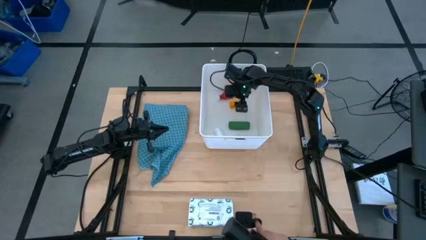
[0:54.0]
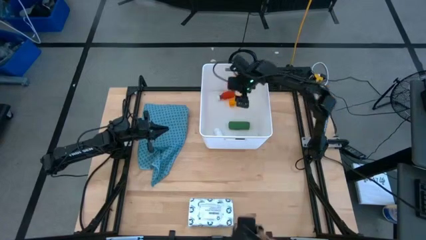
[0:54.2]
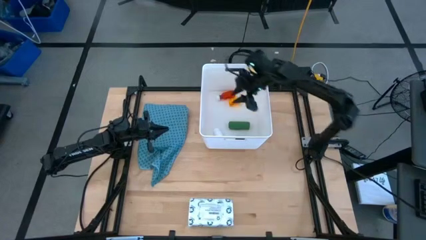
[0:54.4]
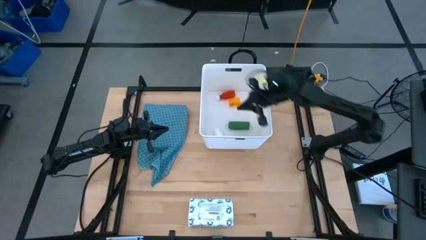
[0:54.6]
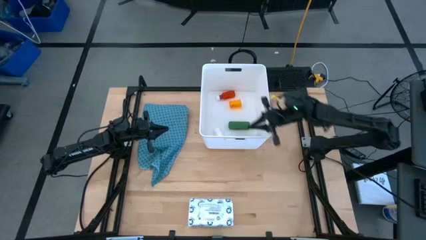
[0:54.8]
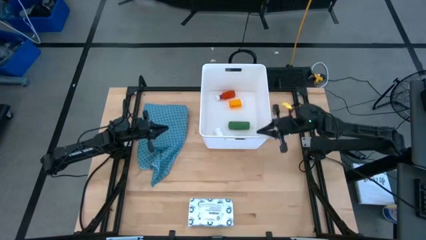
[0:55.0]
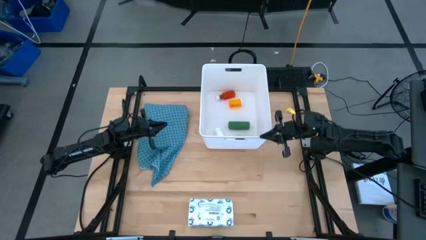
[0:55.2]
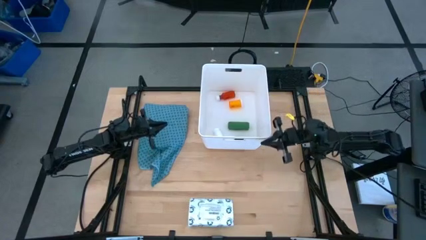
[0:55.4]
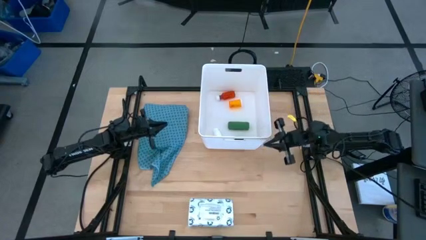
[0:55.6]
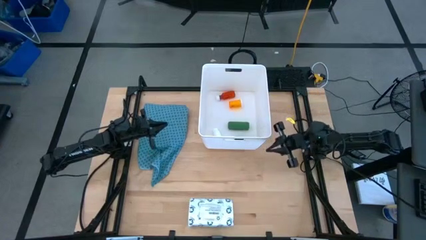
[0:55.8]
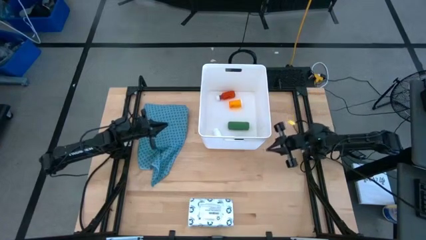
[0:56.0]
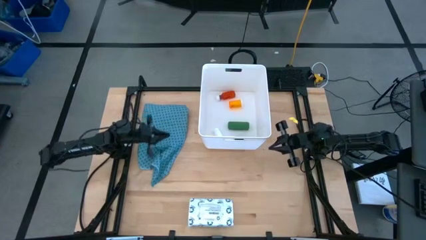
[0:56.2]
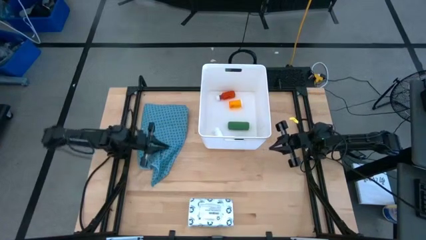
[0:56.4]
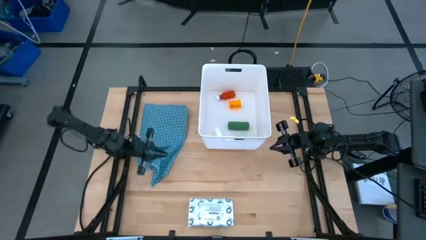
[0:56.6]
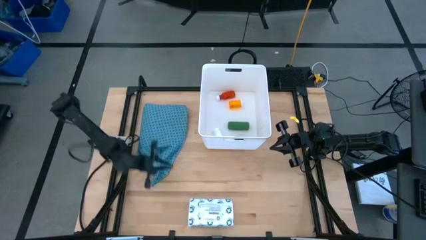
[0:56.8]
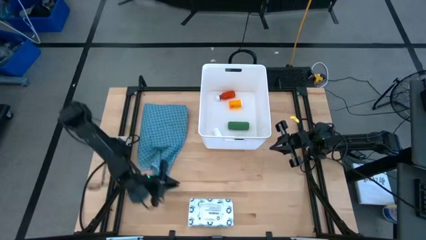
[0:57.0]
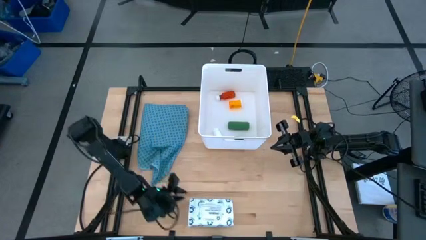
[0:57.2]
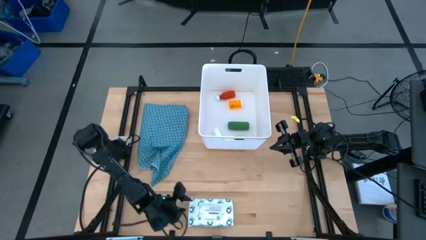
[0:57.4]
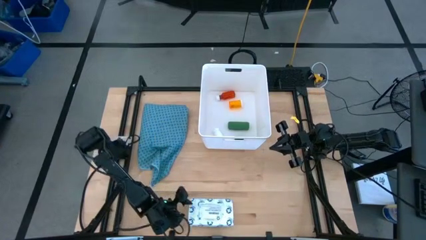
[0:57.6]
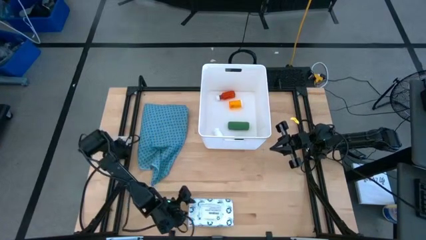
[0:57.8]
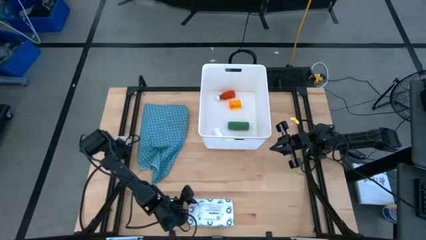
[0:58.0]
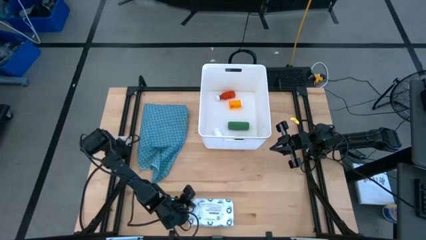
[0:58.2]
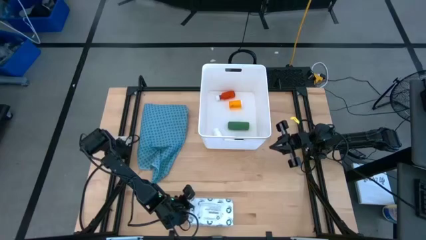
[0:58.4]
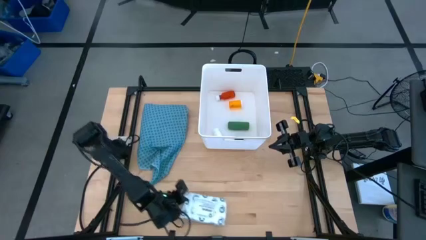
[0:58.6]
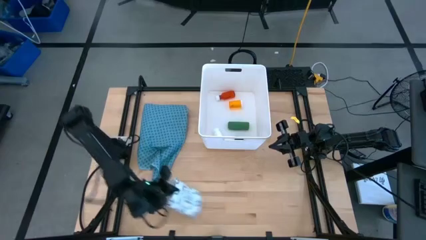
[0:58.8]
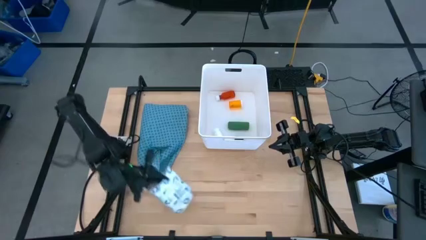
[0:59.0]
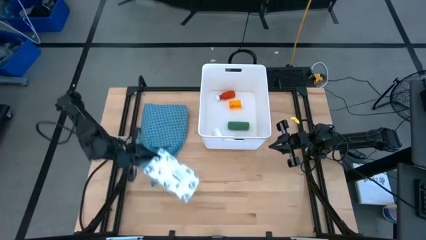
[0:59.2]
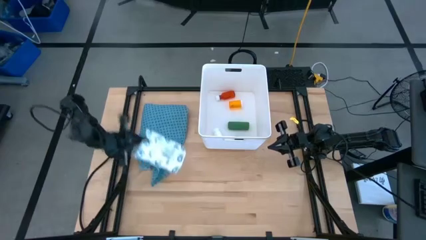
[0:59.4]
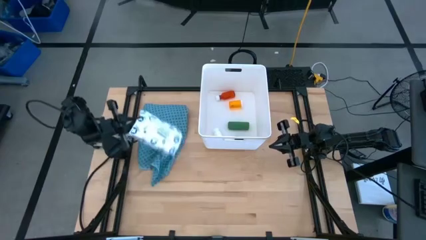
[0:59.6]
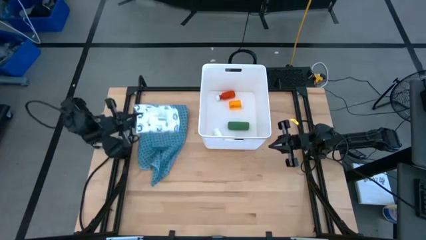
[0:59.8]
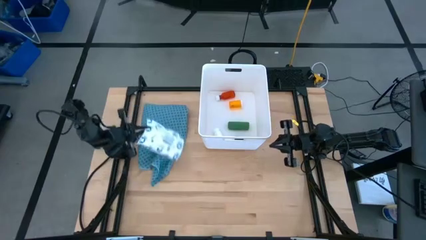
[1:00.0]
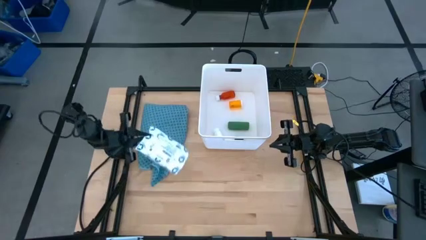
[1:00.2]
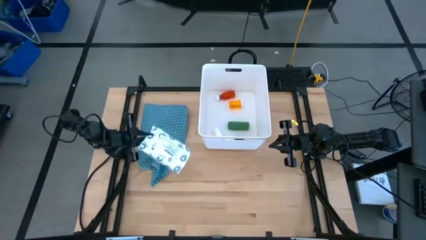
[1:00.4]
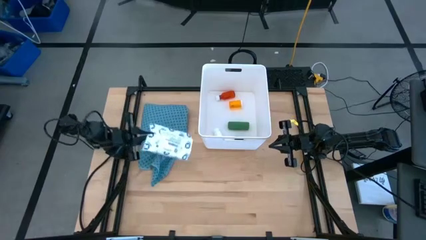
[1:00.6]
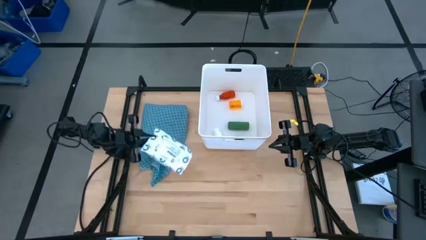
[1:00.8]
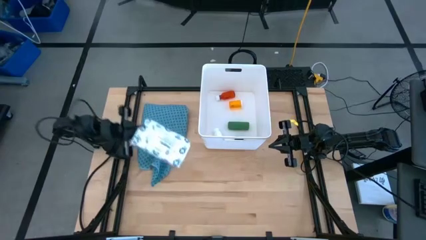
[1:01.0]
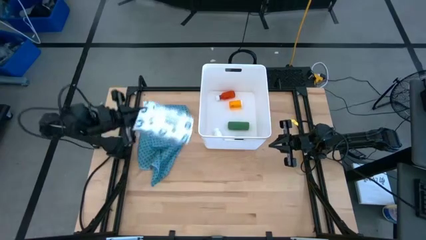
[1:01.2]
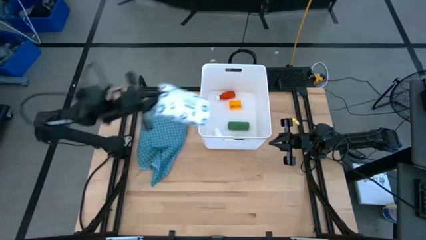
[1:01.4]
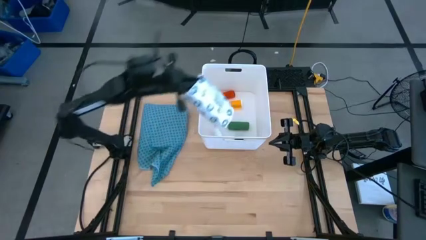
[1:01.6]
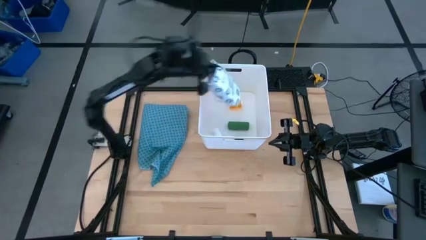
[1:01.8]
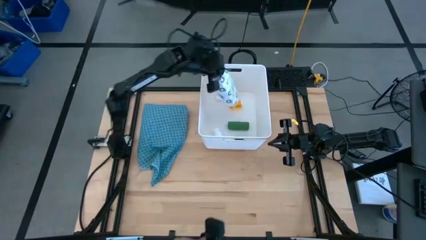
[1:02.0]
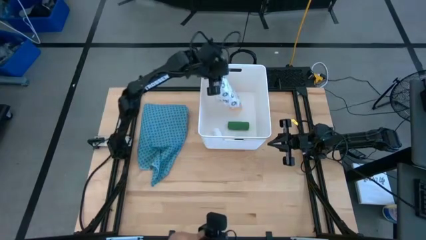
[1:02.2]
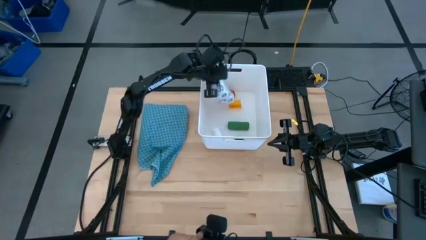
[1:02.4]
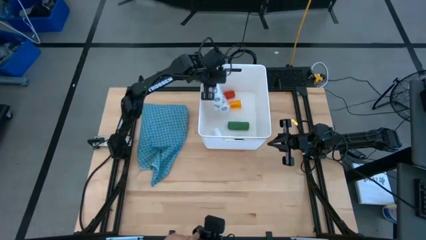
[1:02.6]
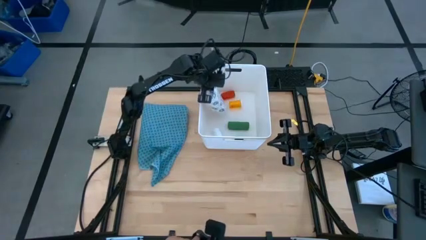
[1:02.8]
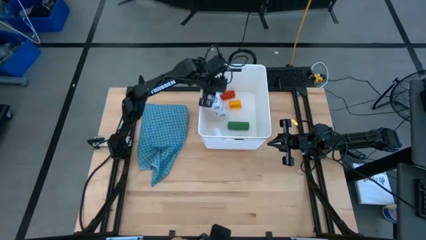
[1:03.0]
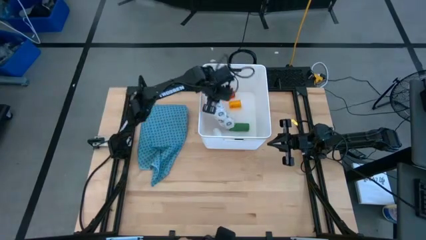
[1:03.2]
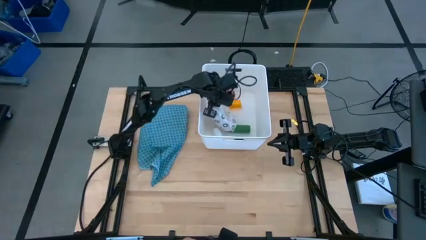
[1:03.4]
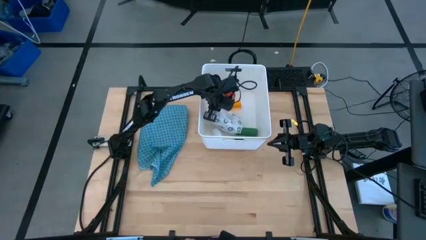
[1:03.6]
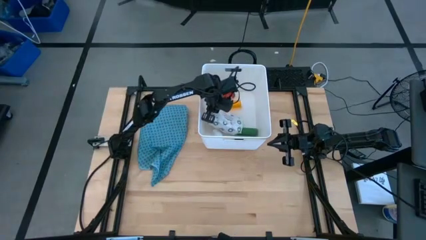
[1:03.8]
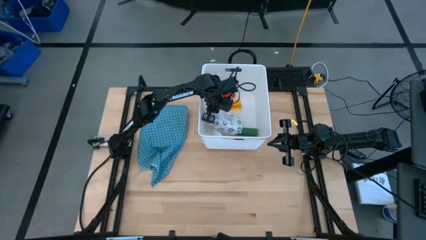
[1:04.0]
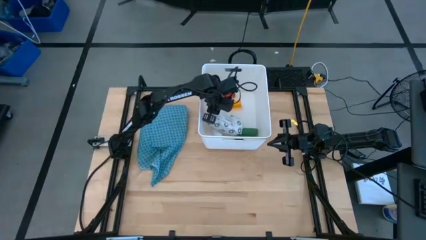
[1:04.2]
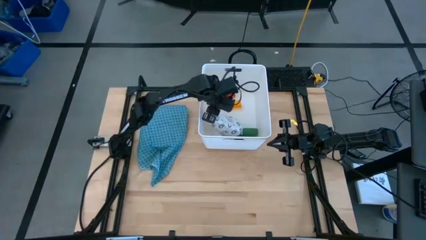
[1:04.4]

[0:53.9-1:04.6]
Task: Pick & place medical supplies in basket/bin
Put the white mailer bag into the white bin

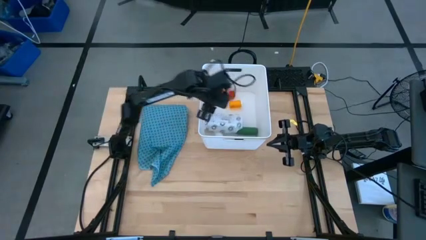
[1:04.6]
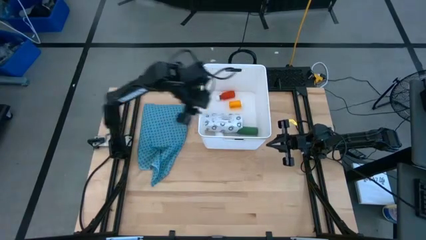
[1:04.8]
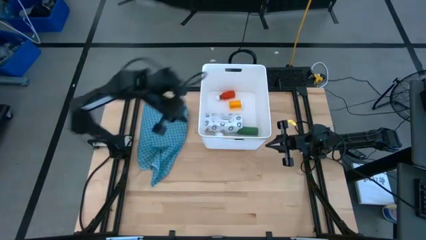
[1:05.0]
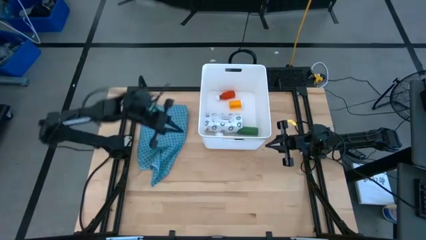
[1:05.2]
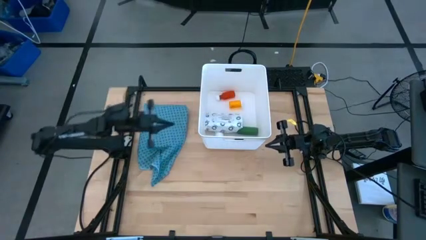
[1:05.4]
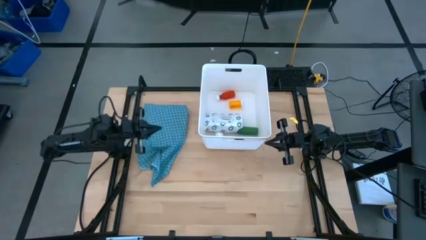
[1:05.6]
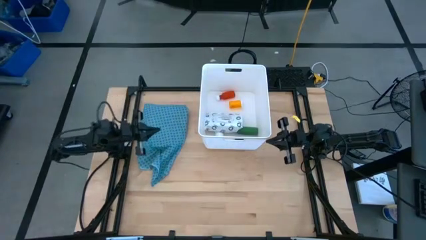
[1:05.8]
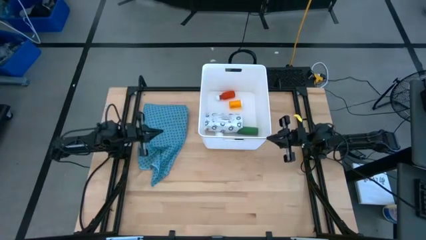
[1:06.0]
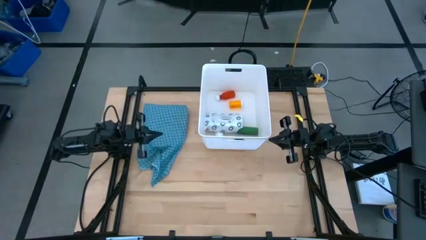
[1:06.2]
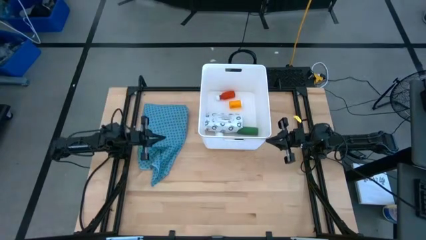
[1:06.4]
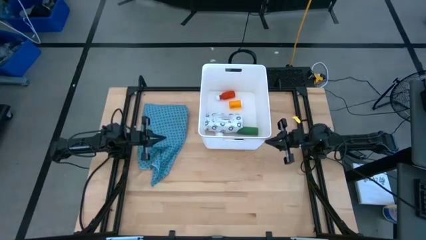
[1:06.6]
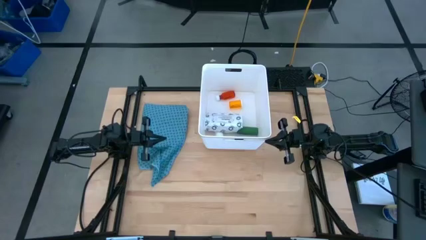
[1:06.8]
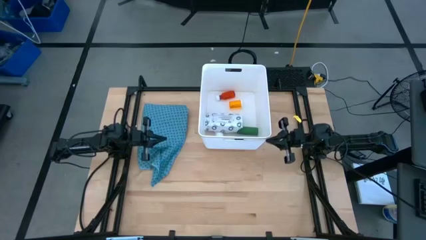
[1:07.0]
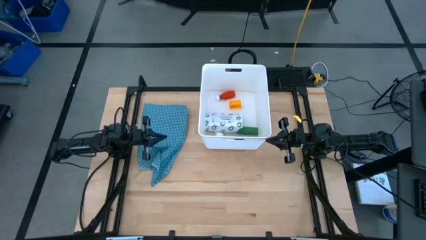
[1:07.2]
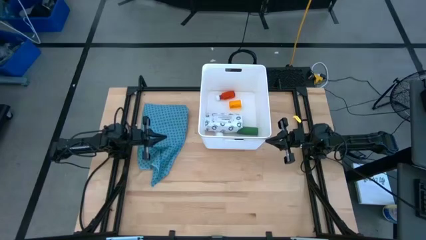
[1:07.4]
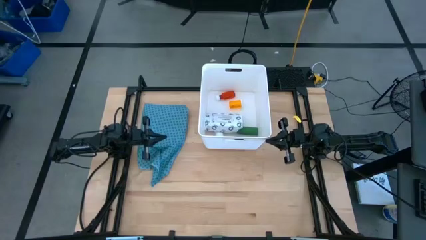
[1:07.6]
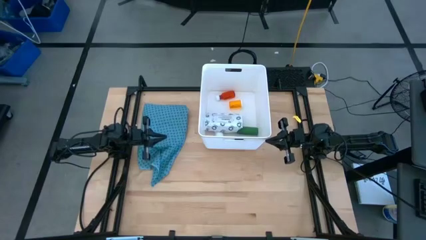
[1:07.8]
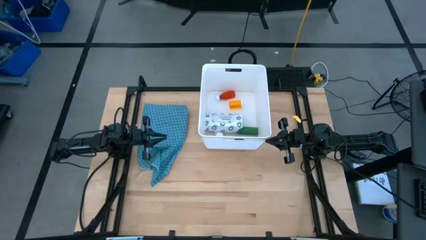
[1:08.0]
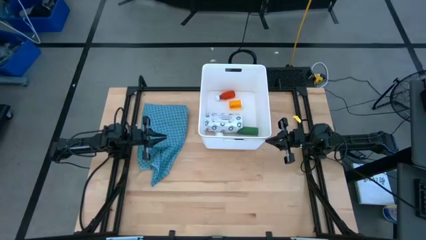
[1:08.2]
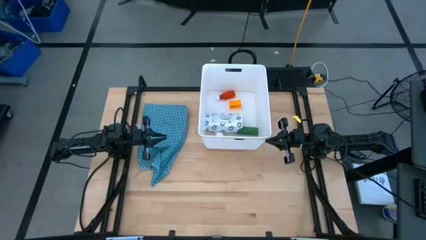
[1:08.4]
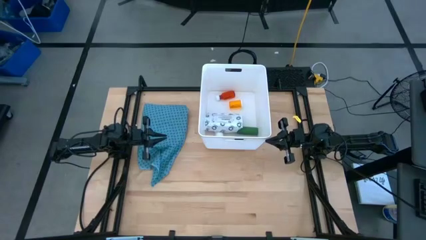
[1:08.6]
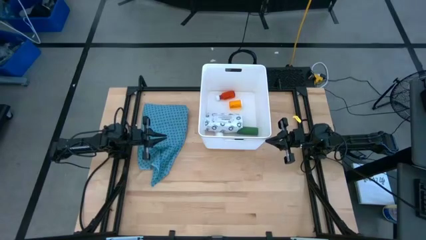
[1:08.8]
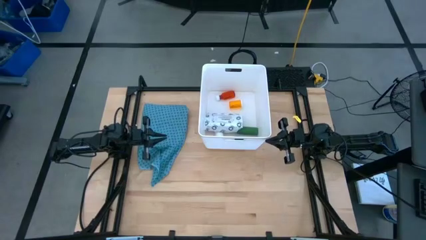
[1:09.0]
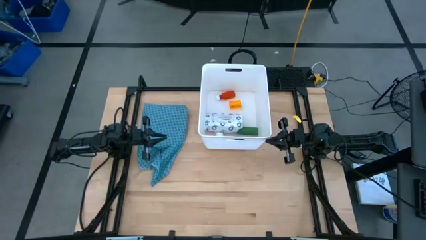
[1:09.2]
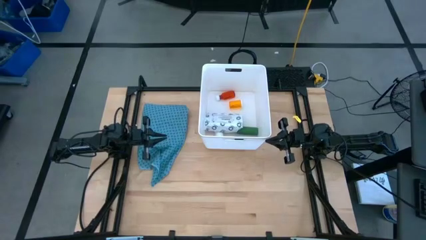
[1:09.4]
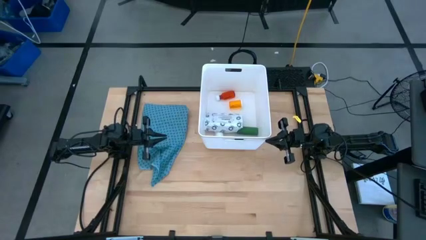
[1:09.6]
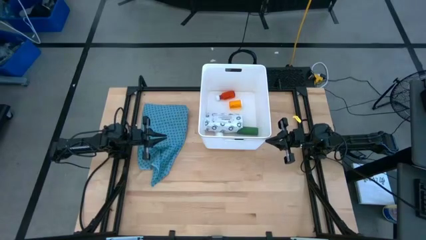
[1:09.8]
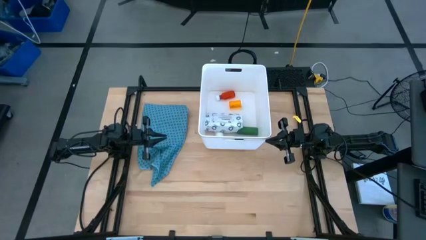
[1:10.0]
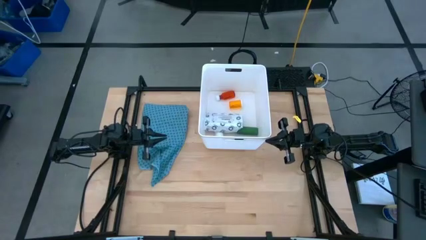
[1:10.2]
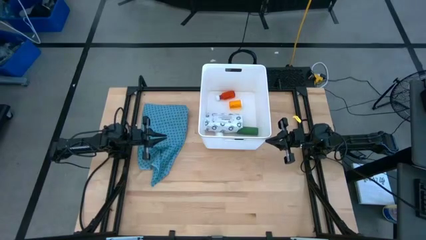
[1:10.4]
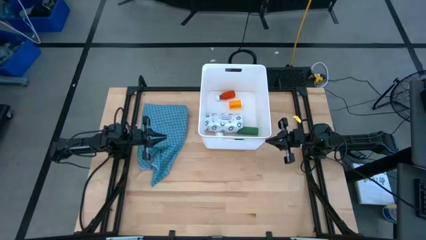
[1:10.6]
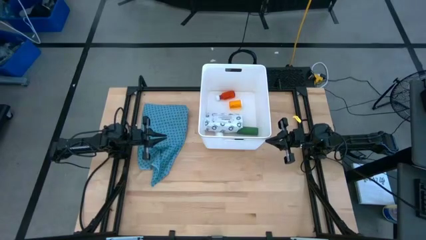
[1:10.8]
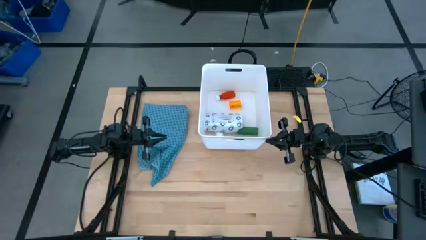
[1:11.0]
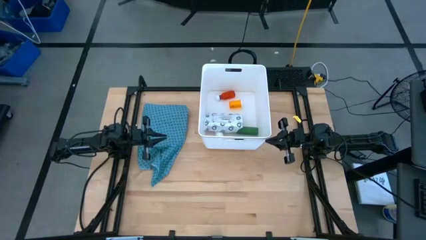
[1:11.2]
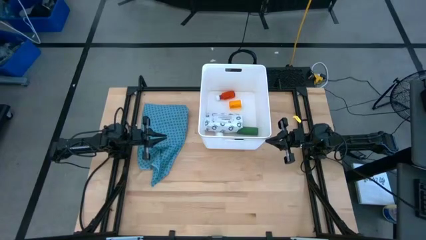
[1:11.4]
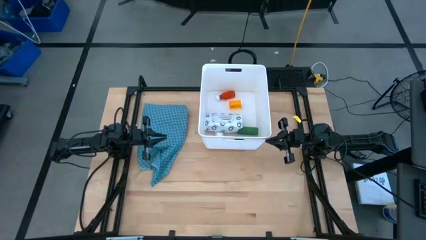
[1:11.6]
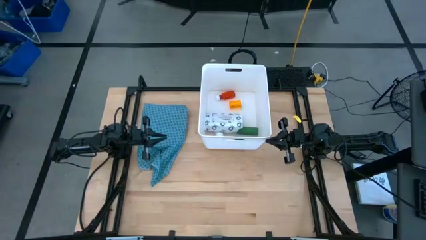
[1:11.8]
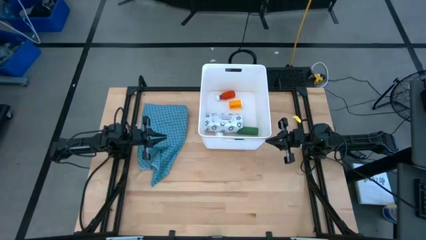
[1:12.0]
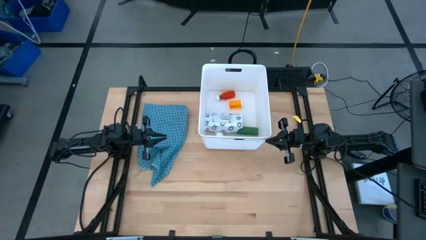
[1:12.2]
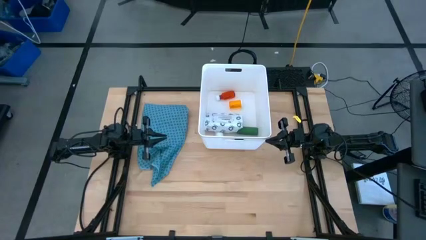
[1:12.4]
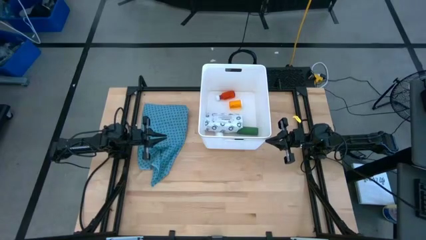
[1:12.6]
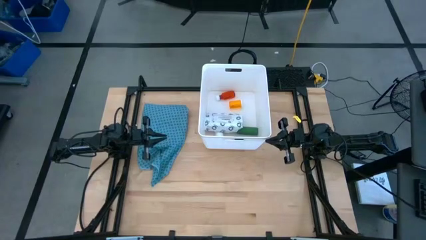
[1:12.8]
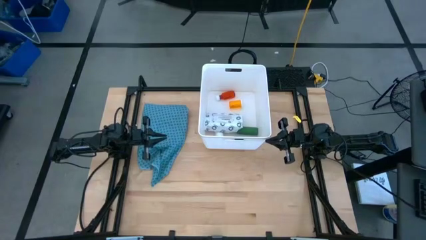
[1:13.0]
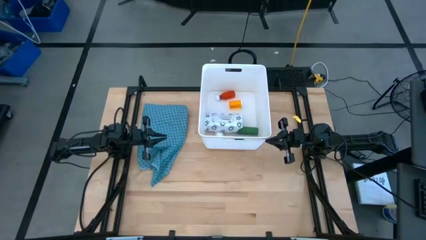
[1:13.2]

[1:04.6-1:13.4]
Return to Home Position
